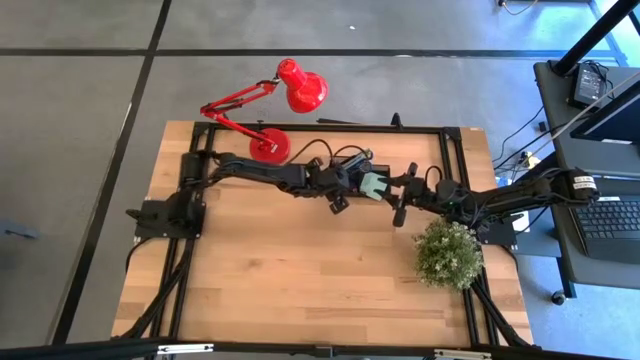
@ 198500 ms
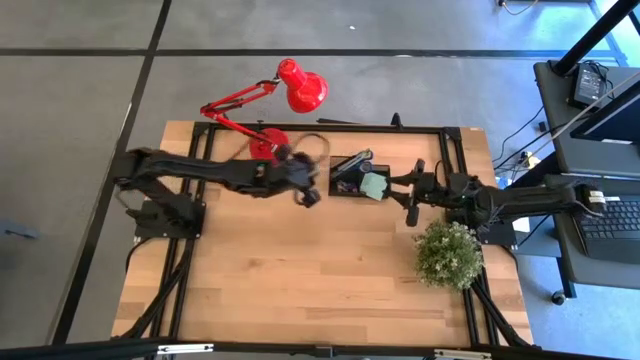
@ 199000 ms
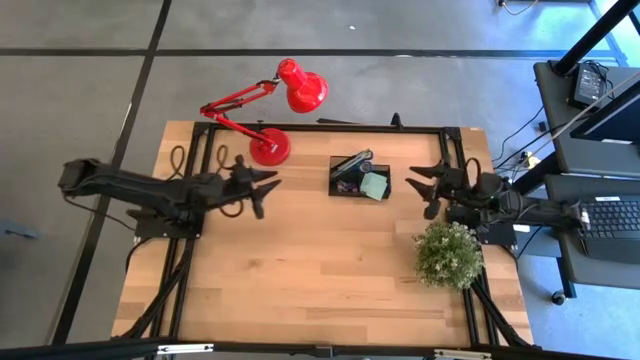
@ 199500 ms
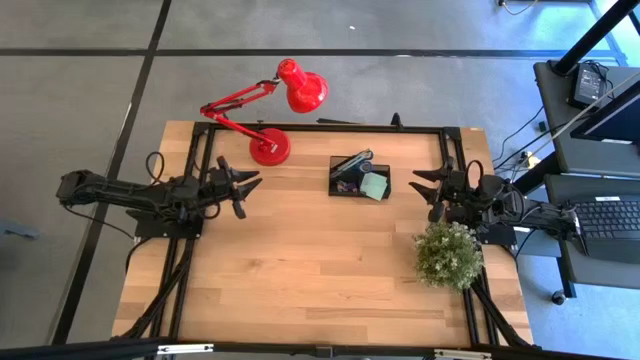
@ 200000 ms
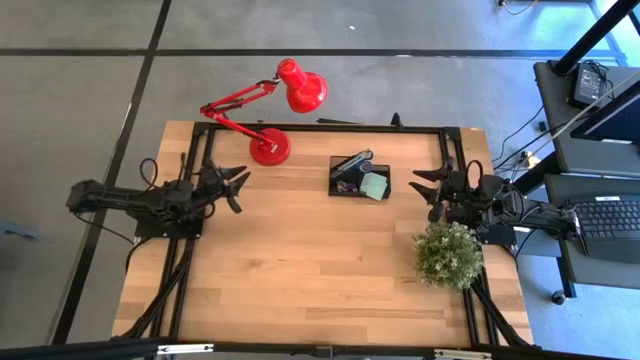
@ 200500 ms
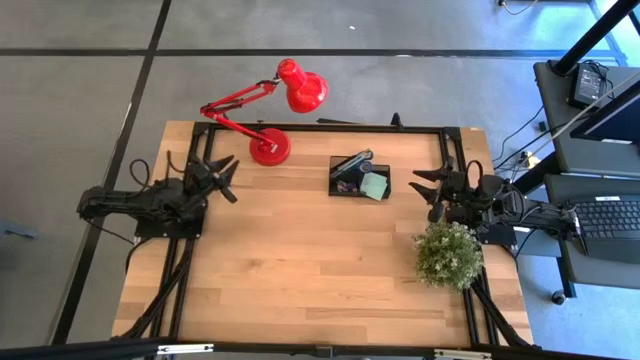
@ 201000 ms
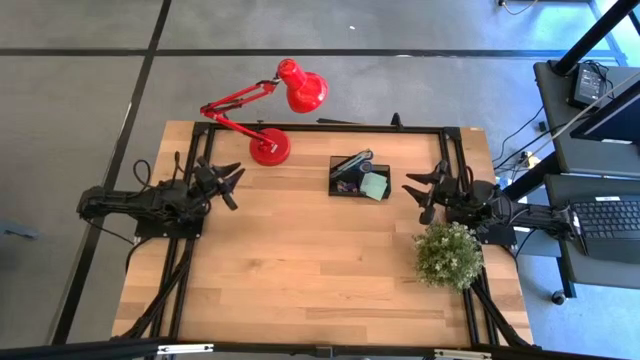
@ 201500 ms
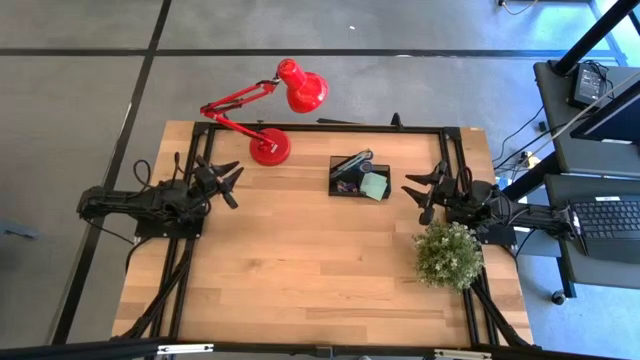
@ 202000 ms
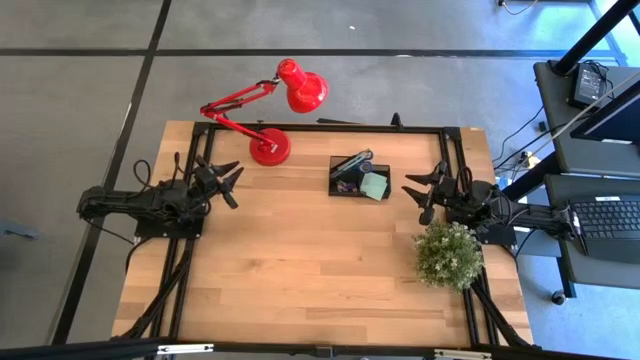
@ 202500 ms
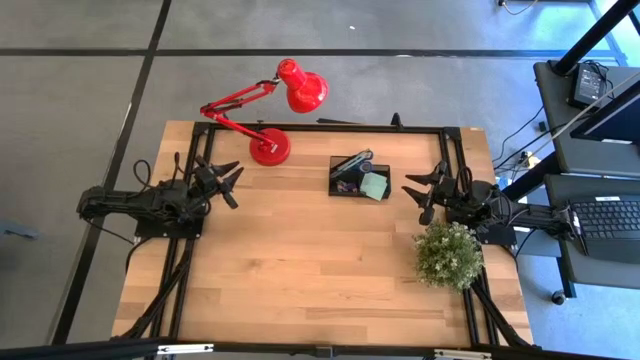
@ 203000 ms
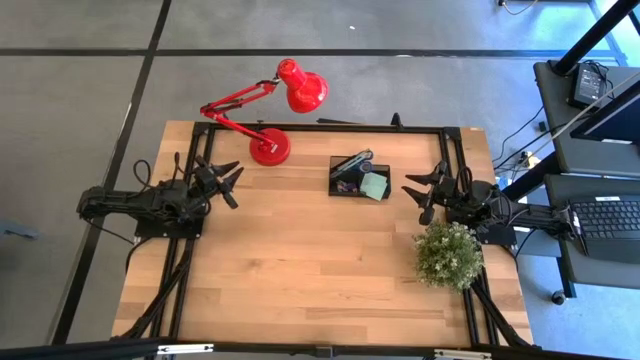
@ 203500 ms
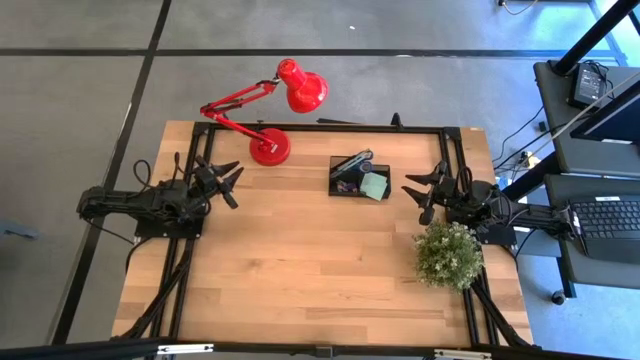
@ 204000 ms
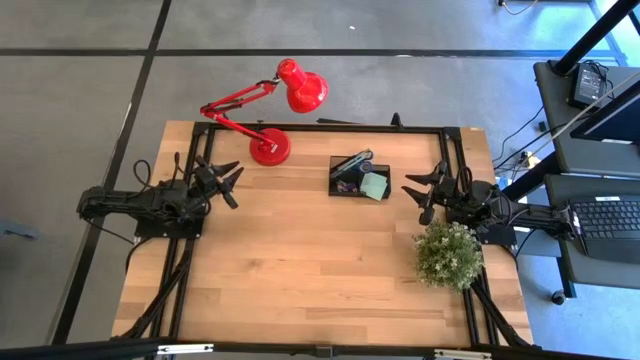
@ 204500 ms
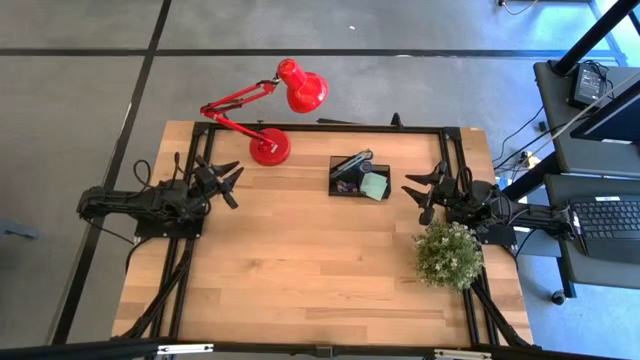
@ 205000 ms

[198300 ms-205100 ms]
Task: Pick and place office supplies into organizer
Return to Home Position

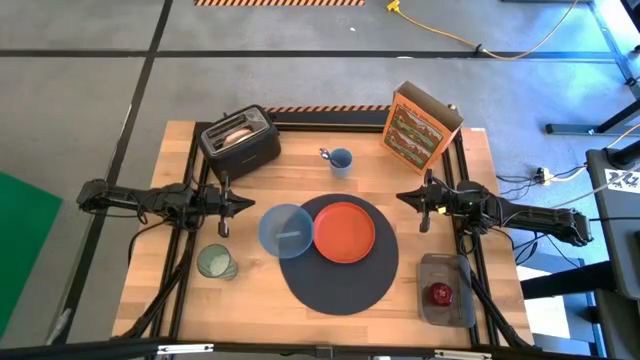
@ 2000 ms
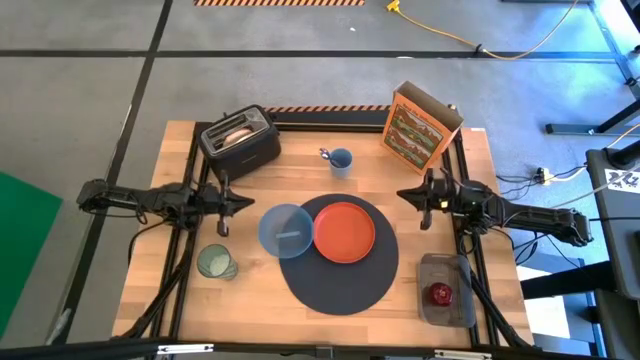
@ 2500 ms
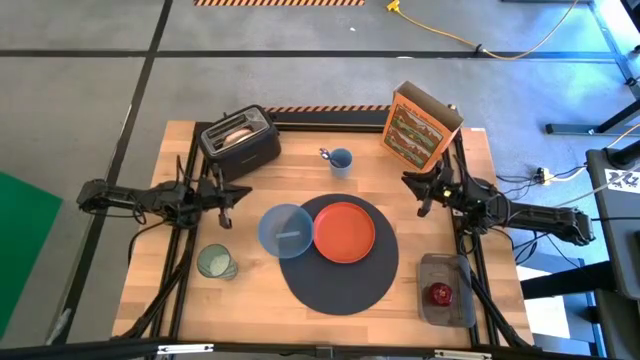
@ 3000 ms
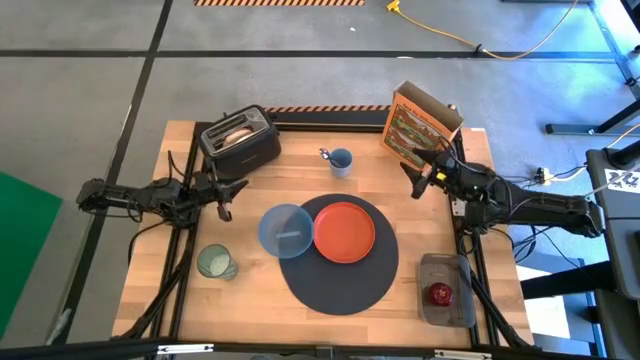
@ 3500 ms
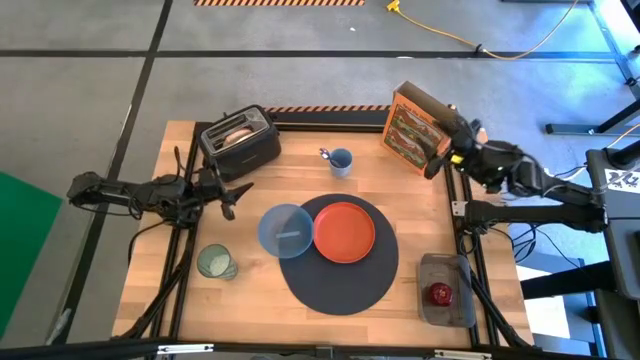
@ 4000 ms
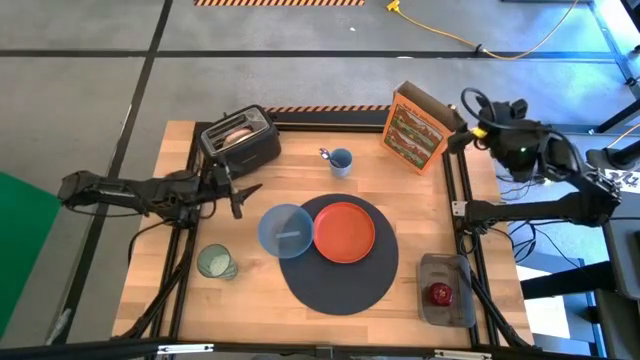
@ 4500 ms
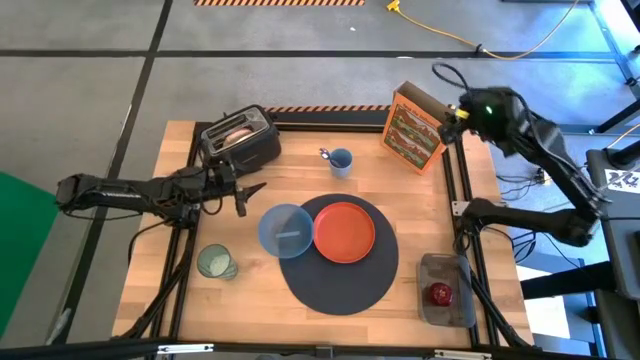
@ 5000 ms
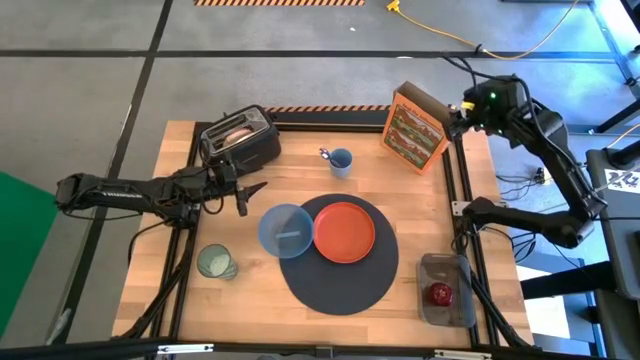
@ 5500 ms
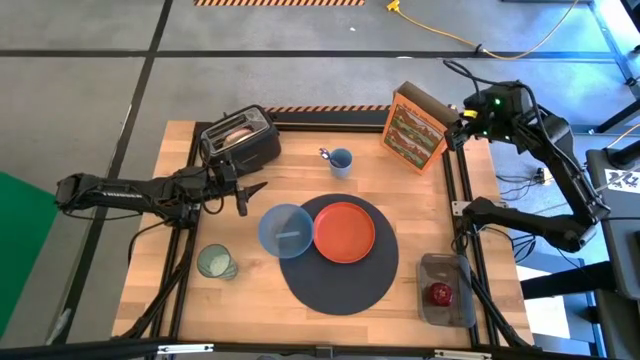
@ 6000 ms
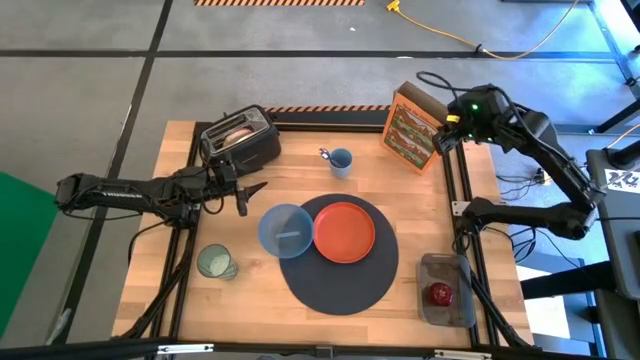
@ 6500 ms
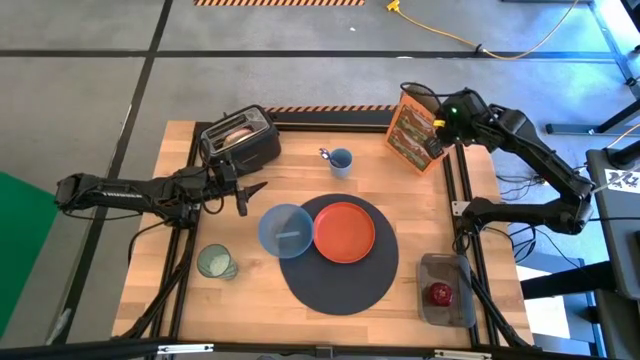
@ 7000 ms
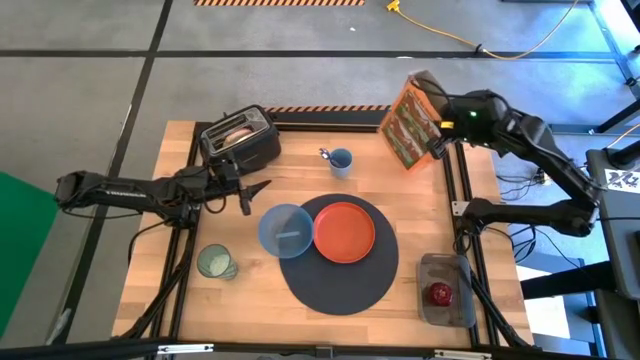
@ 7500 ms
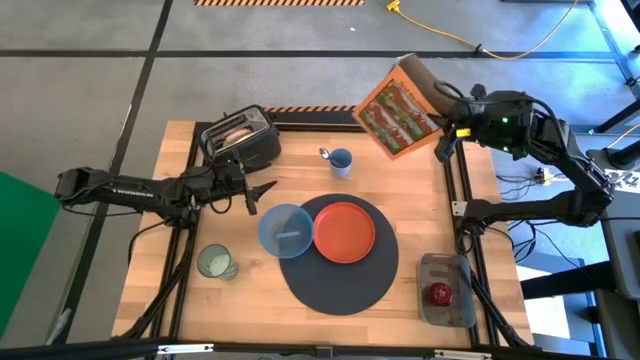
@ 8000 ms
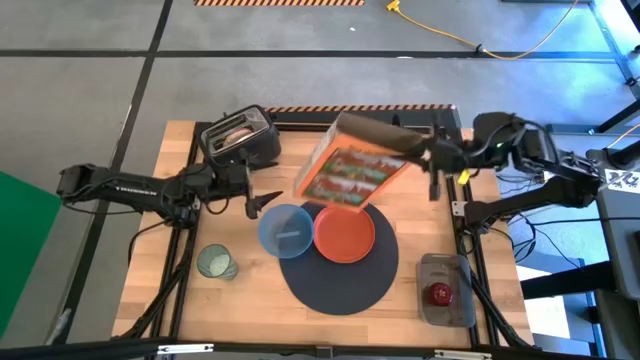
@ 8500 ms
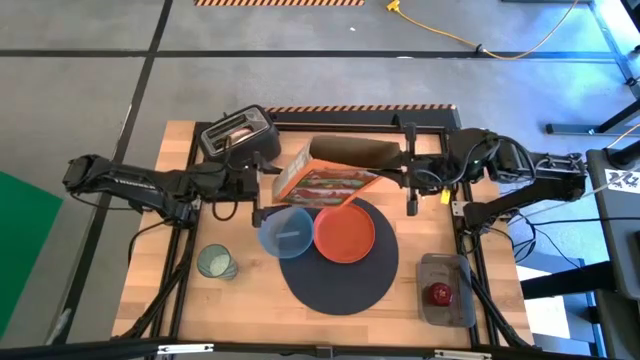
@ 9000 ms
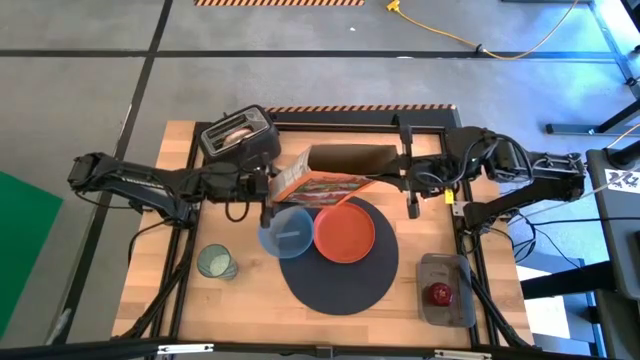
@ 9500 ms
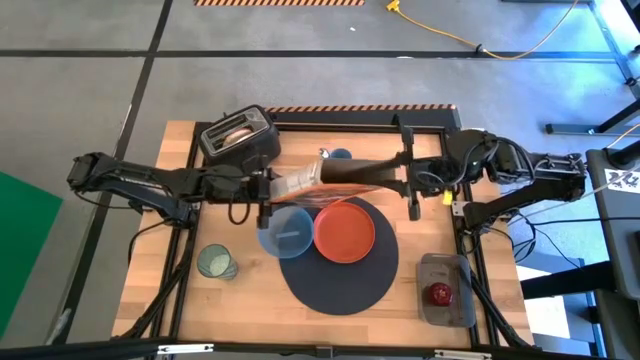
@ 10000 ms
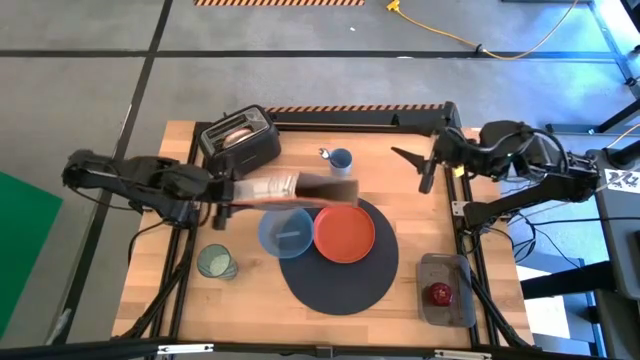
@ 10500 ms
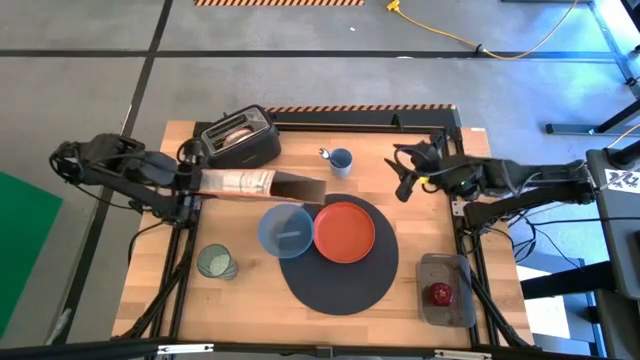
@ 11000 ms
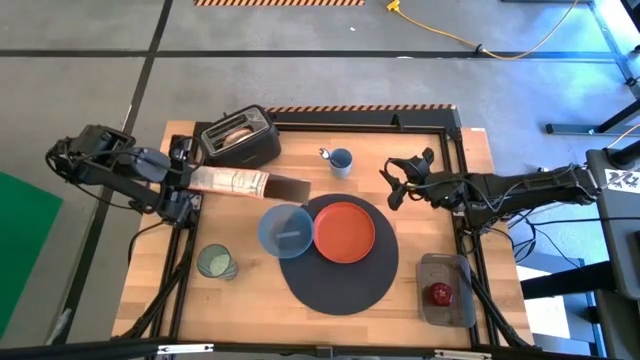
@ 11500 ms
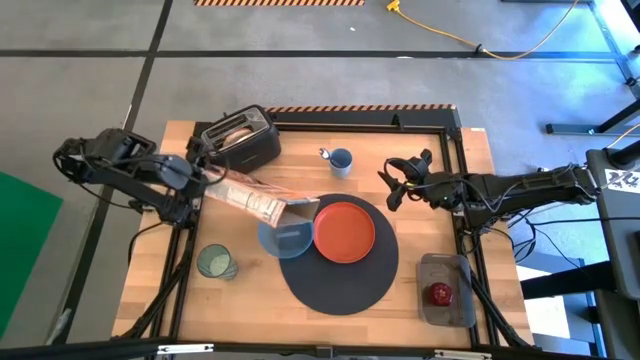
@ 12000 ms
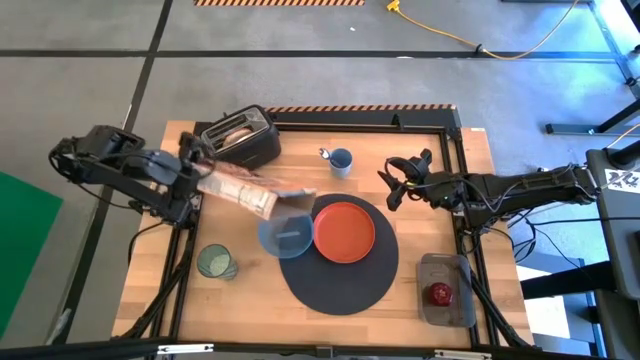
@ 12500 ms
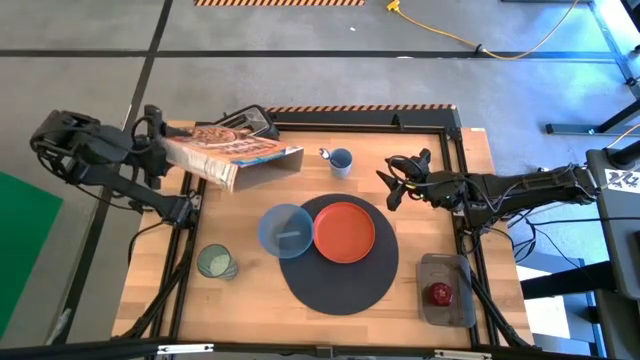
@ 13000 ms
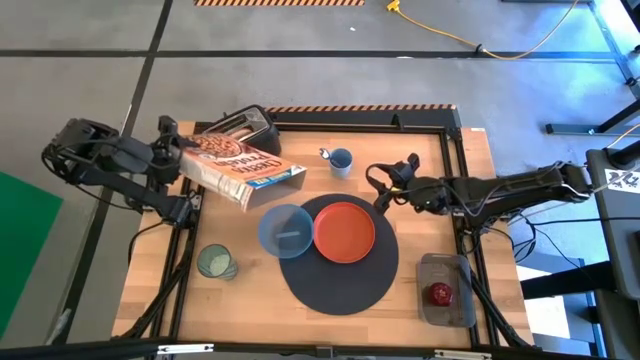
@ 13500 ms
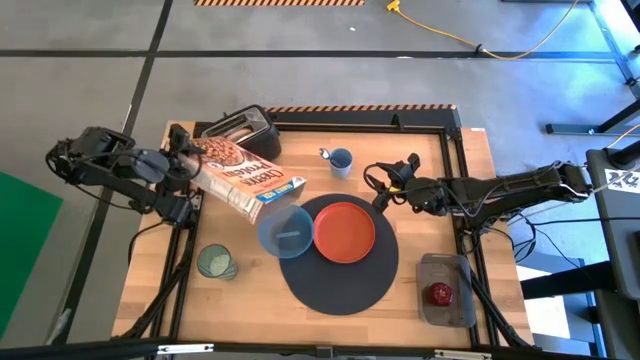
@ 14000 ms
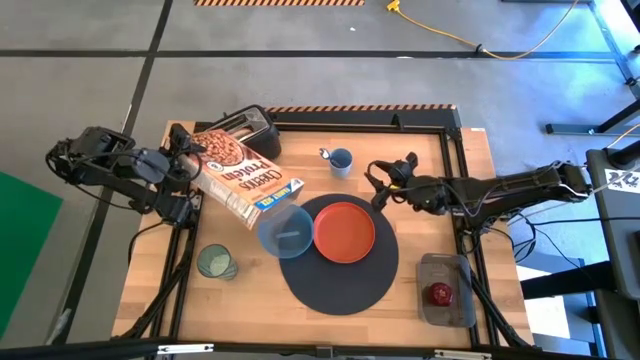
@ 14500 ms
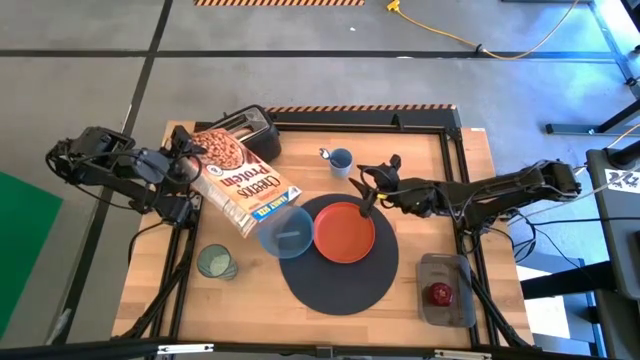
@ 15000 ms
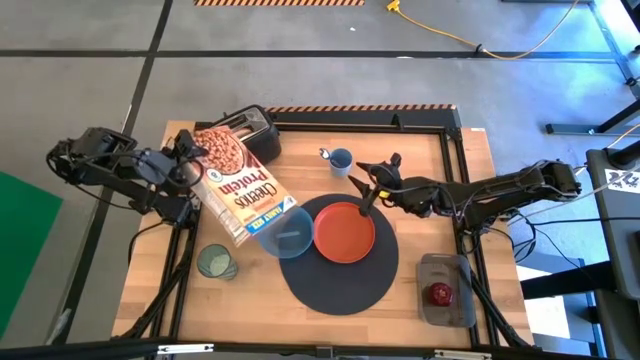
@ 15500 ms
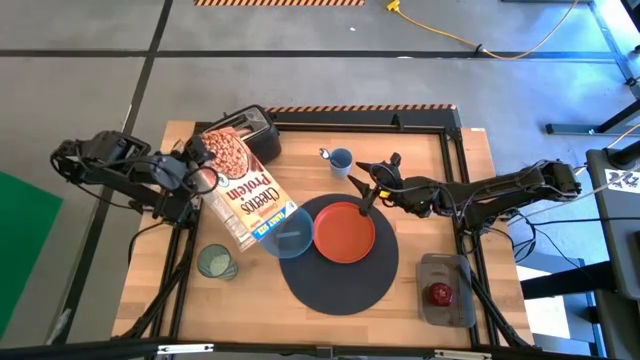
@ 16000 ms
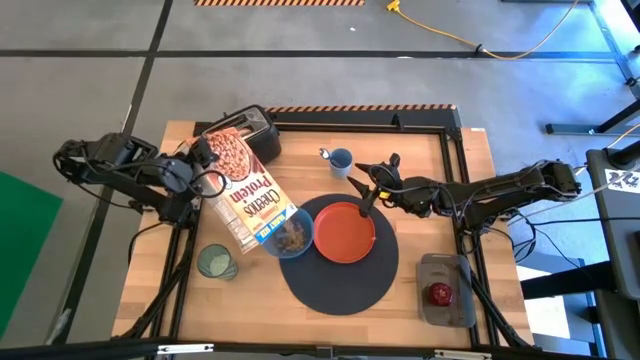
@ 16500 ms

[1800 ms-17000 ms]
Task: Arrange a breakfast setting
Pour the cereal from the cereal box into the blue bowl
